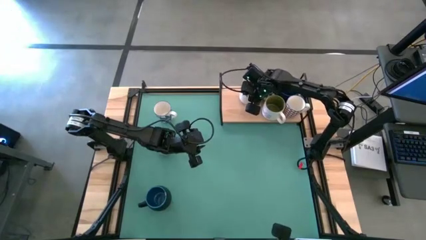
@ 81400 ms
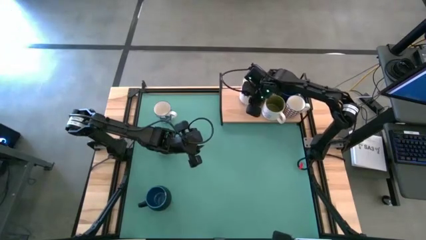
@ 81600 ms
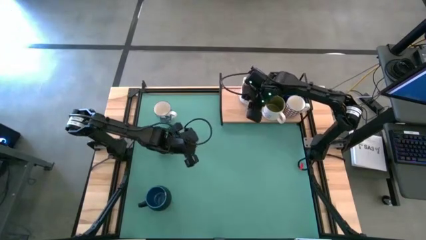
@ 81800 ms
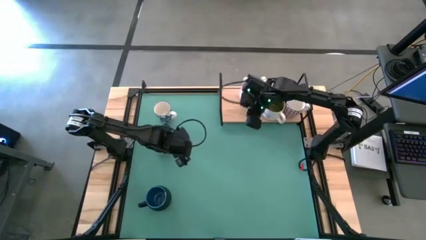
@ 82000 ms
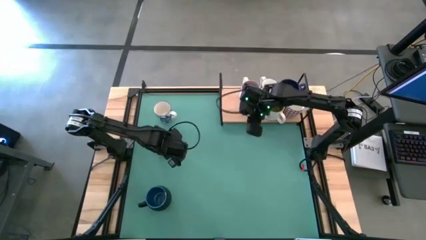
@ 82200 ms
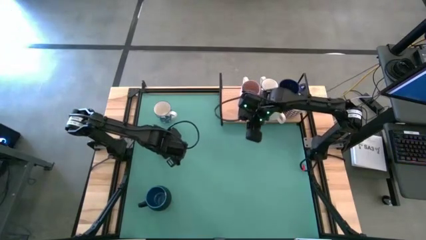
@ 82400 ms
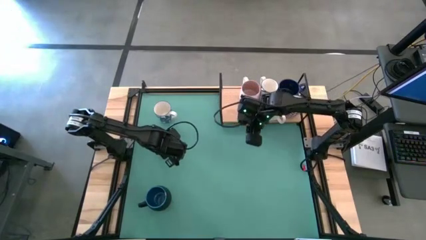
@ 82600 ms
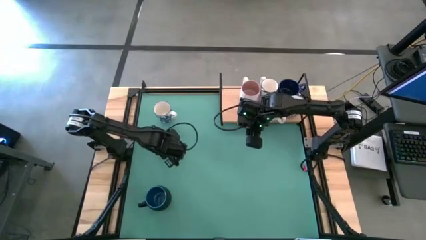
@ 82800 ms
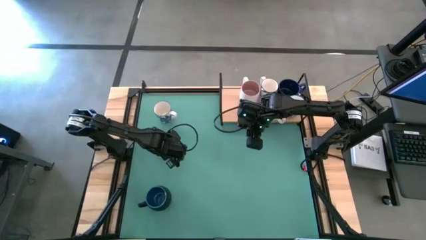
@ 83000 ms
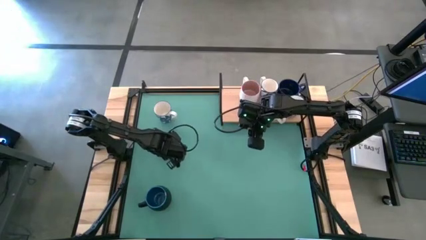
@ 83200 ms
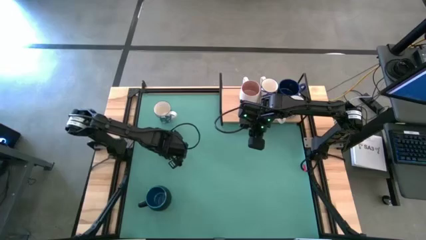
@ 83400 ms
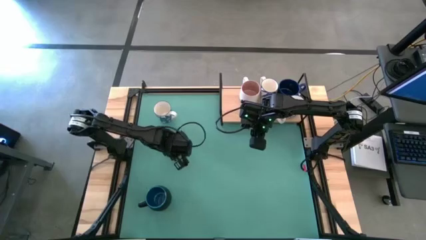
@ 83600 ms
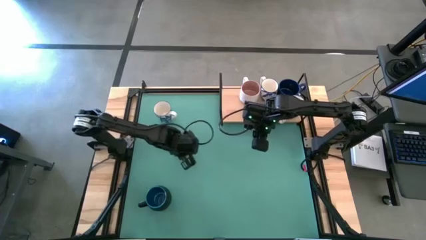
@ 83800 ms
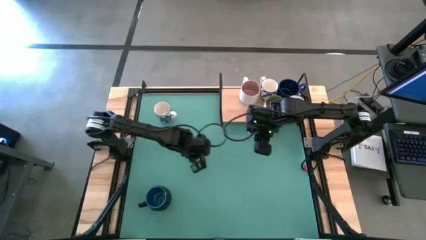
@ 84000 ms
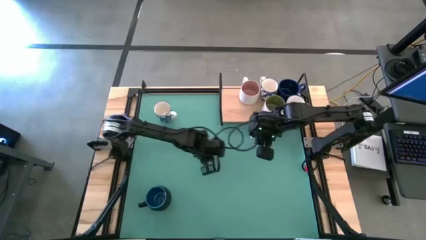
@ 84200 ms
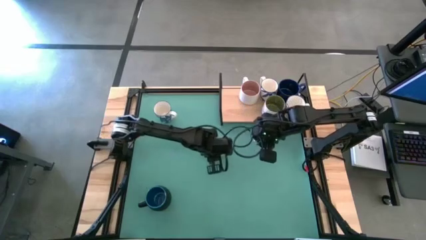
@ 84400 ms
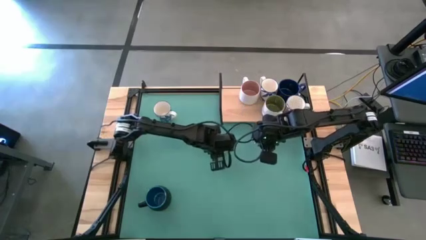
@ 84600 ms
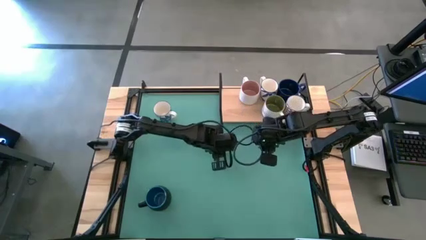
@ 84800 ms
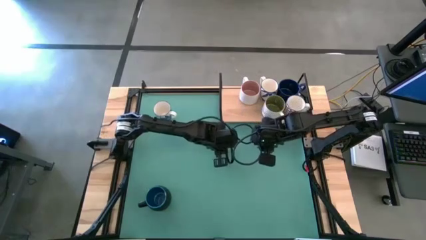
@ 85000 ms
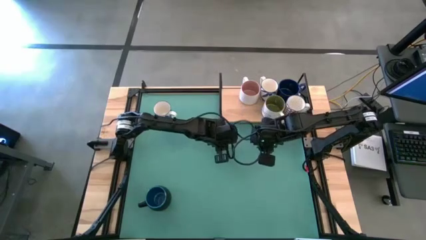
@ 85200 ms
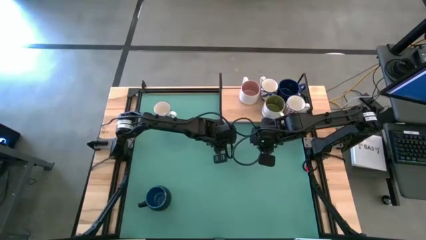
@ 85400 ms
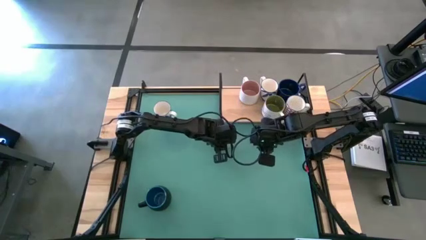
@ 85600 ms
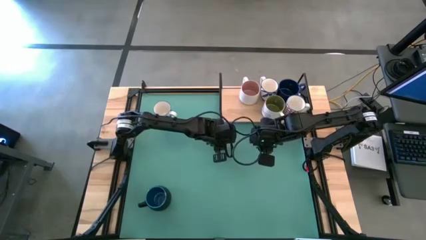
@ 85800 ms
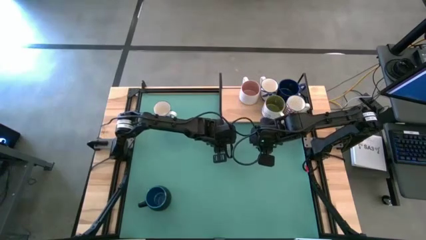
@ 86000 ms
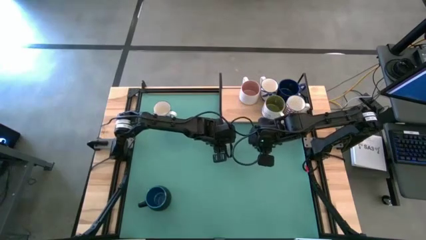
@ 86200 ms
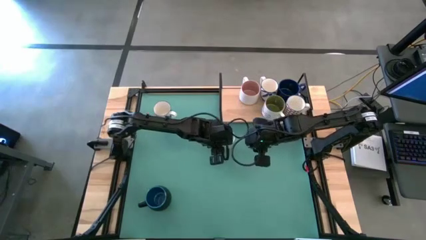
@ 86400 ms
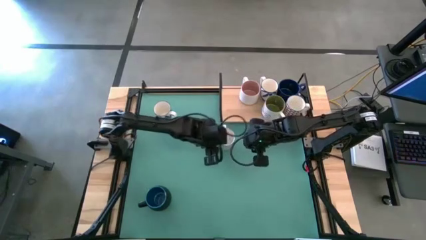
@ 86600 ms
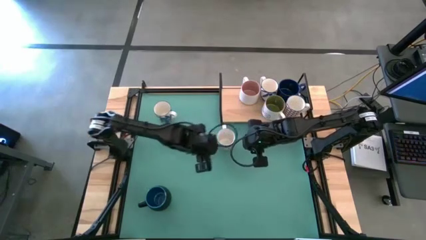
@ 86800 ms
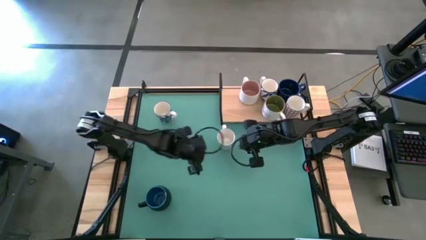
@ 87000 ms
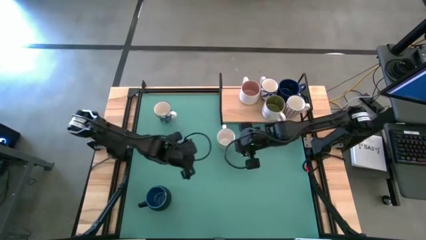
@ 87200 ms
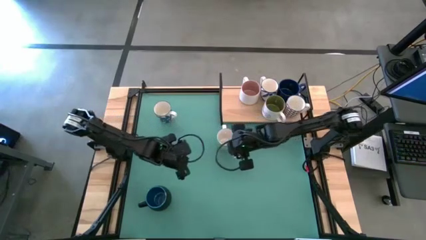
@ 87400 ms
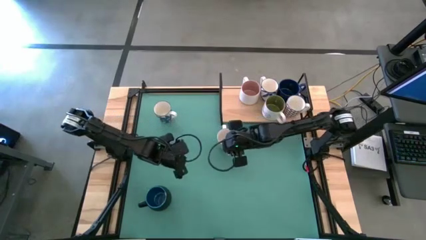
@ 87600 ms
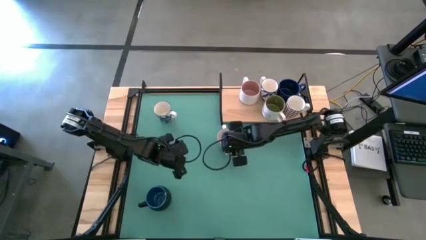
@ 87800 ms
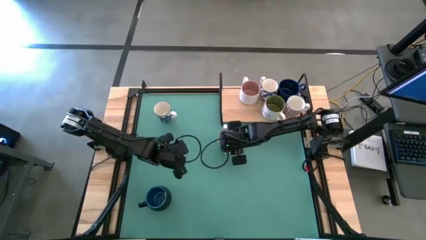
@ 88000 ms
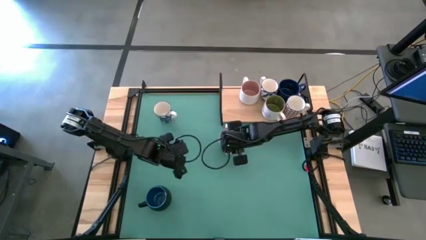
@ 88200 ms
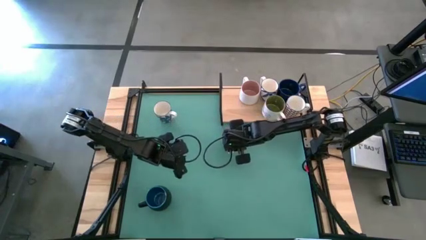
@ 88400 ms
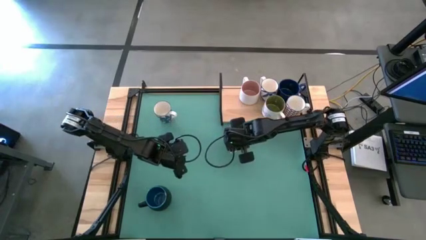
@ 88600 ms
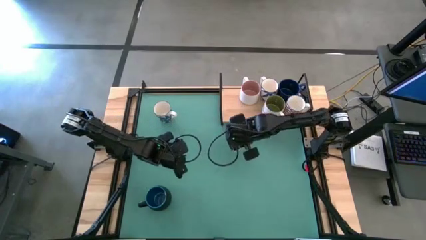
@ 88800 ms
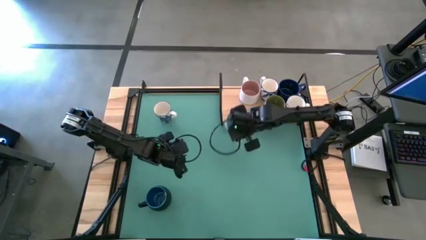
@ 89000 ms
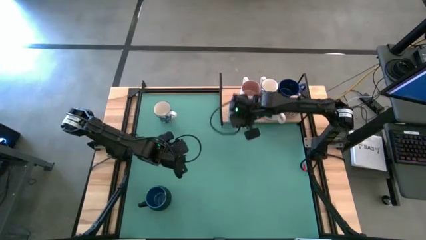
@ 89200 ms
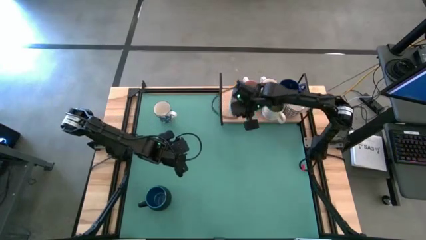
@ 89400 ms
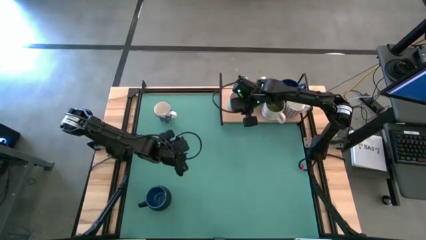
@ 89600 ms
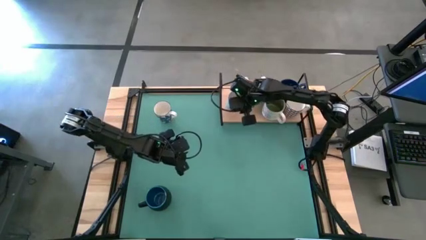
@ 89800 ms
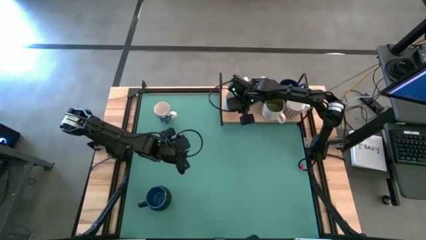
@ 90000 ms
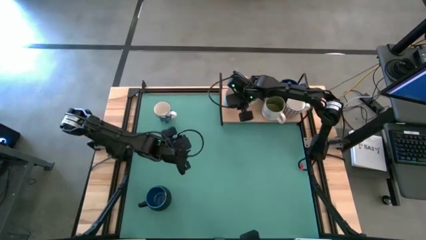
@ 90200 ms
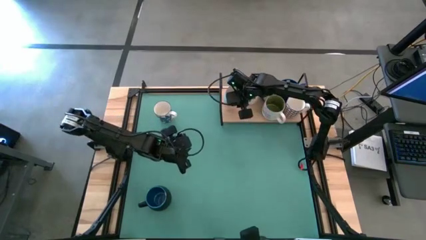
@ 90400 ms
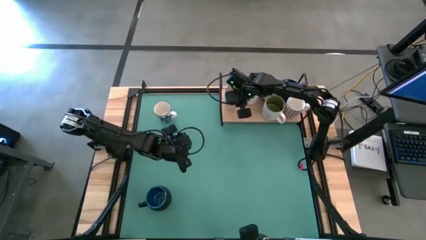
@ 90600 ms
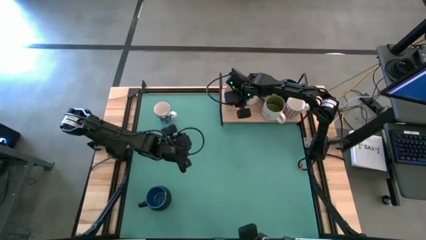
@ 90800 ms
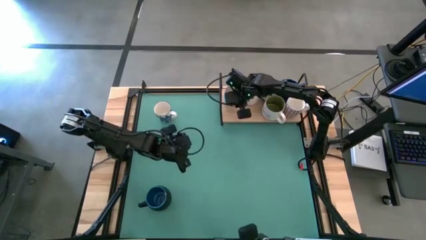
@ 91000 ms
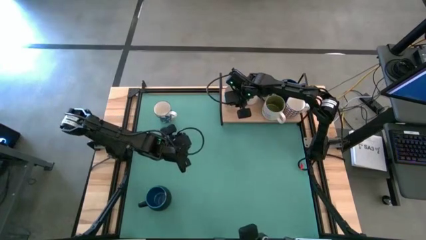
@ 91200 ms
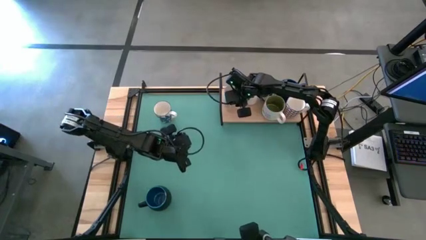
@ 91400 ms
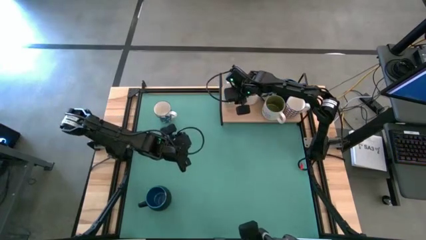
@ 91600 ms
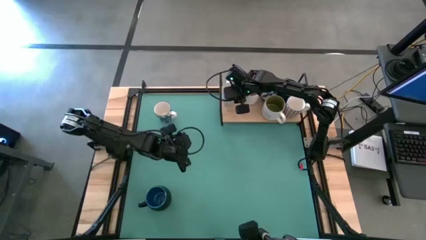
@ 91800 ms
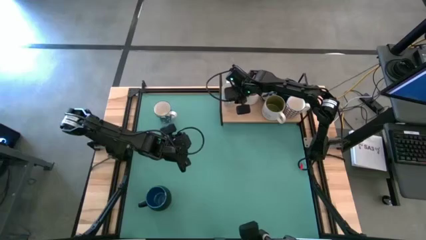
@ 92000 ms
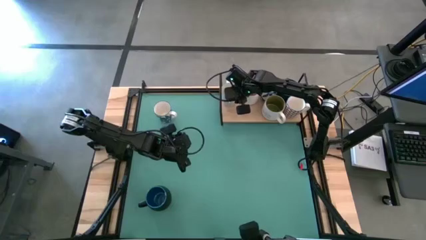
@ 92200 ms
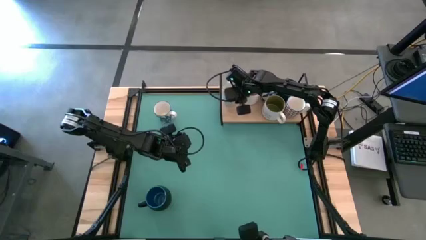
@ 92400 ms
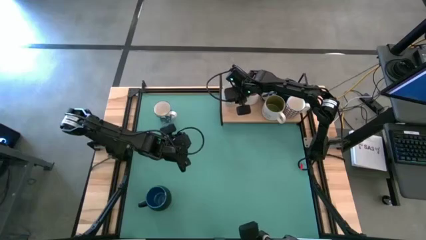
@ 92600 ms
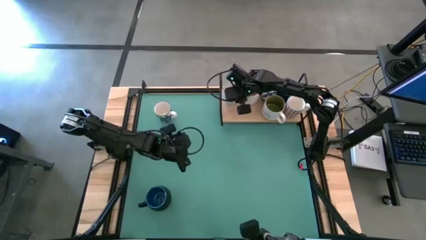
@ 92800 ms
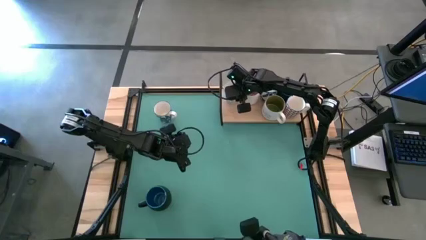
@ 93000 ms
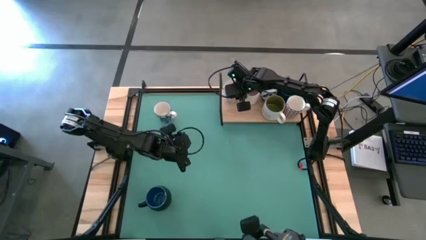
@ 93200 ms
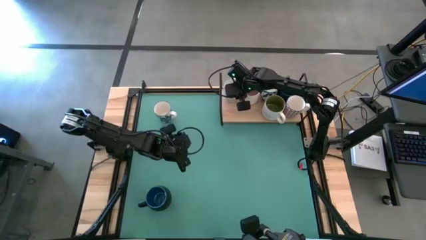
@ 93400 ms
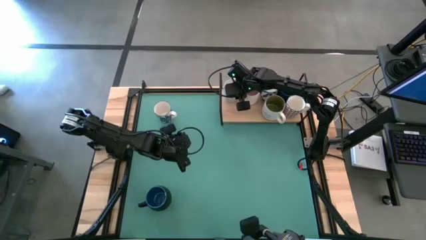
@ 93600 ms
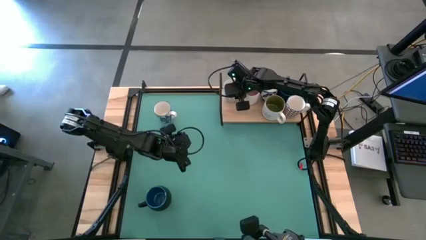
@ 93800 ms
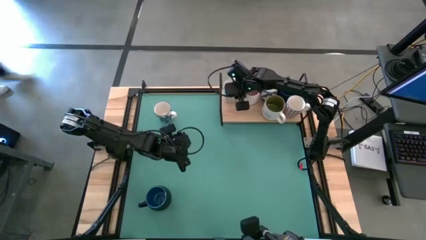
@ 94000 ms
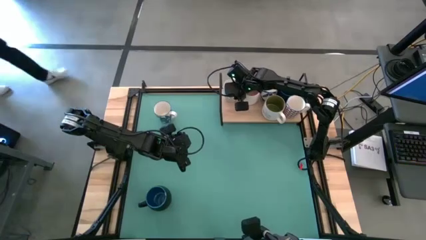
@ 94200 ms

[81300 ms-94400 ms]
Task: Place coffee mugs
Put the green pattern mug on the shelf
